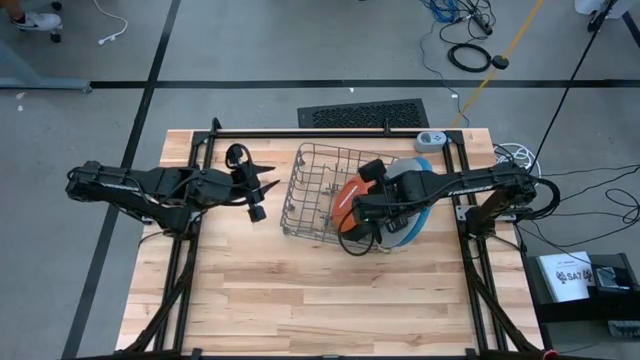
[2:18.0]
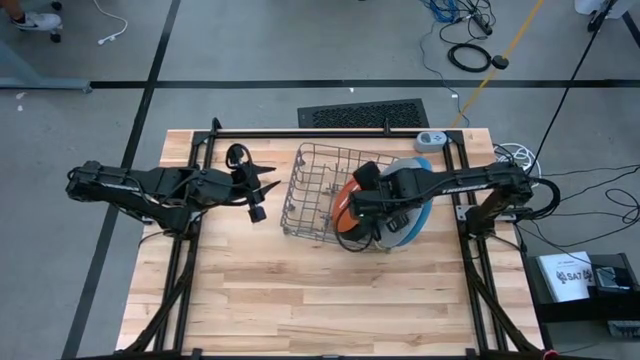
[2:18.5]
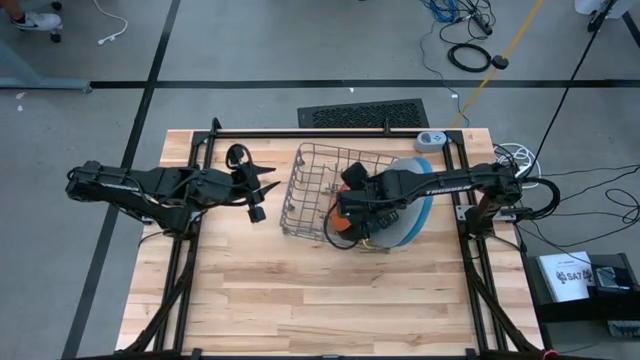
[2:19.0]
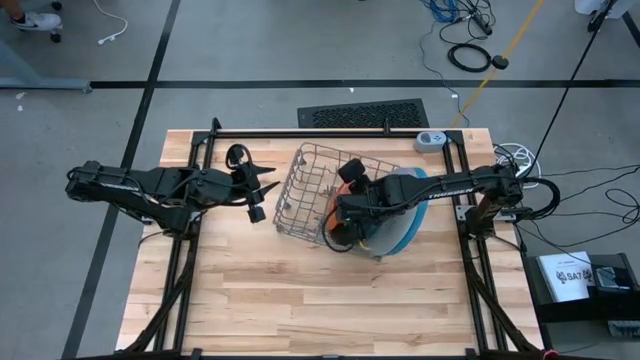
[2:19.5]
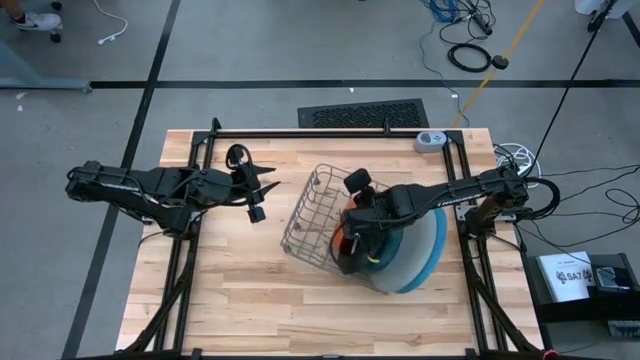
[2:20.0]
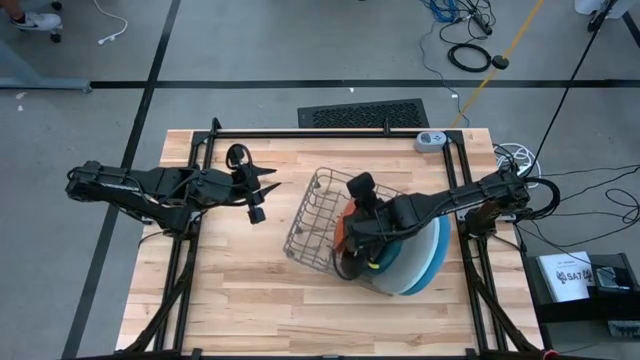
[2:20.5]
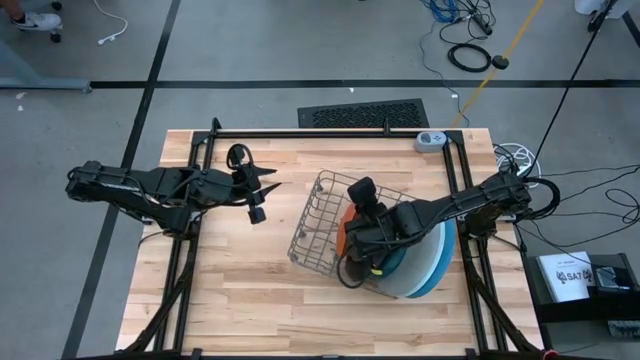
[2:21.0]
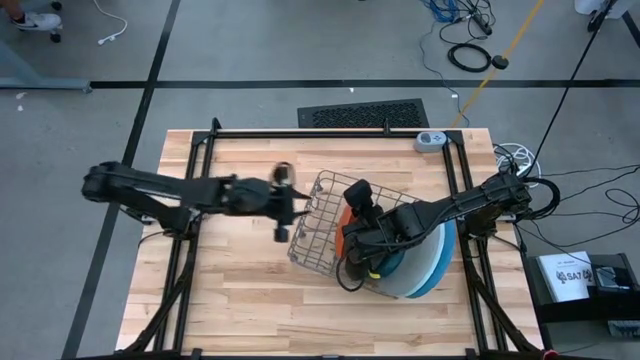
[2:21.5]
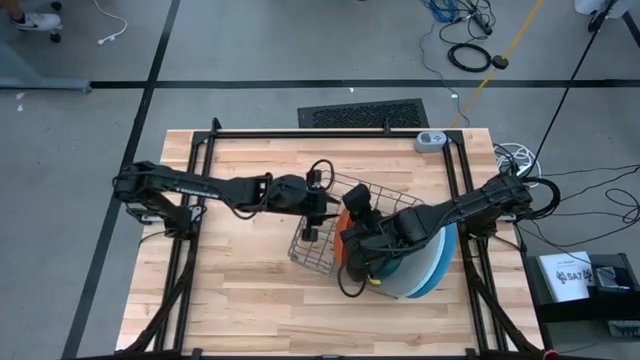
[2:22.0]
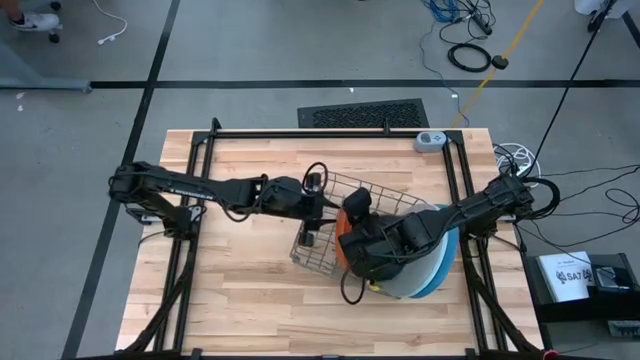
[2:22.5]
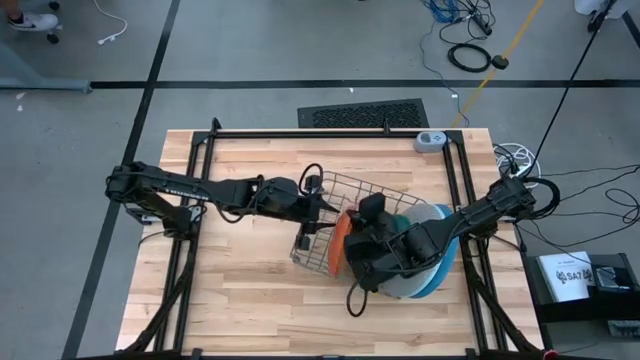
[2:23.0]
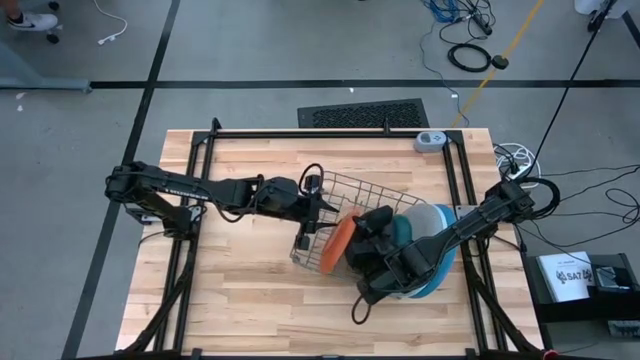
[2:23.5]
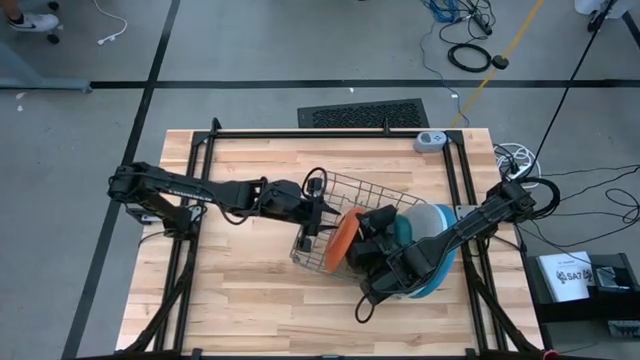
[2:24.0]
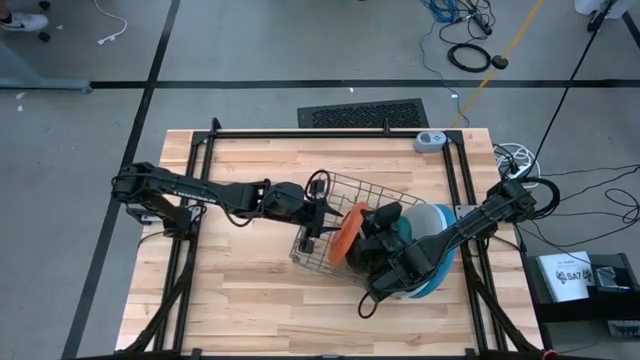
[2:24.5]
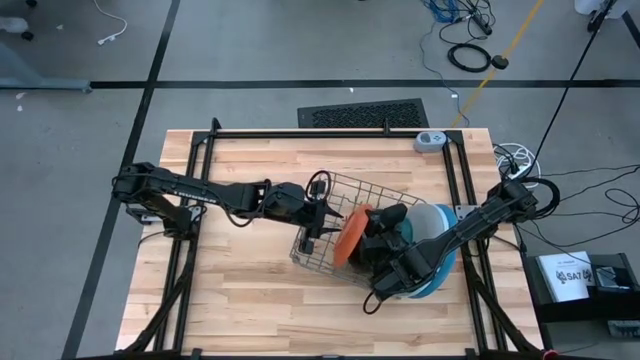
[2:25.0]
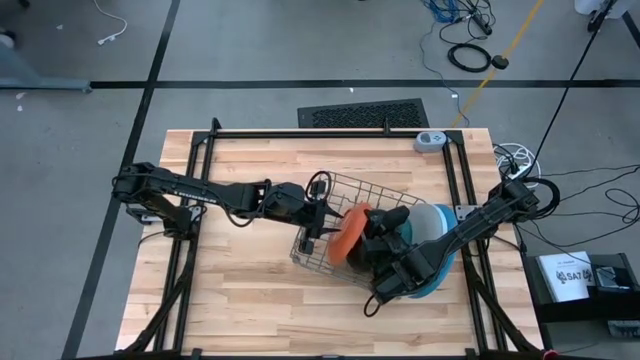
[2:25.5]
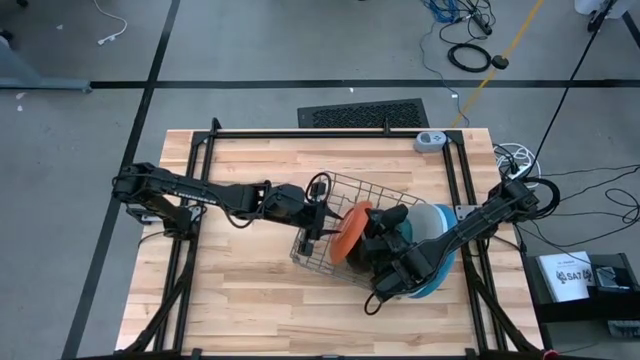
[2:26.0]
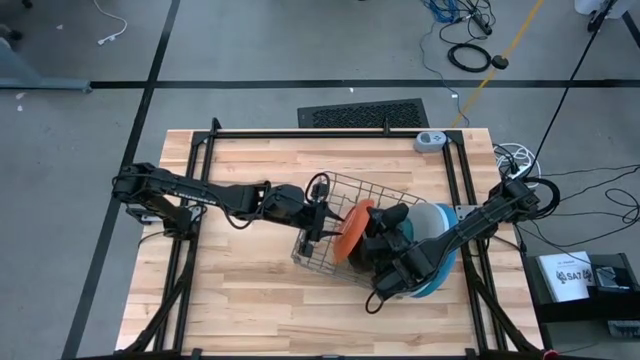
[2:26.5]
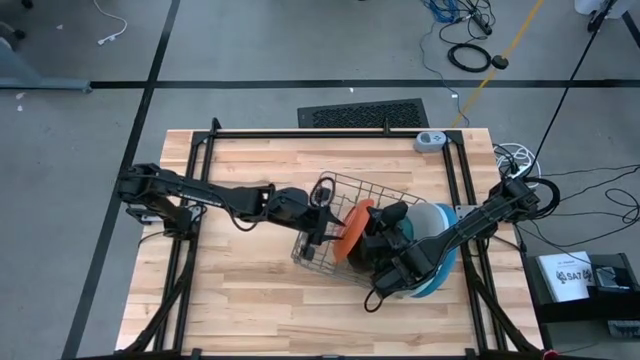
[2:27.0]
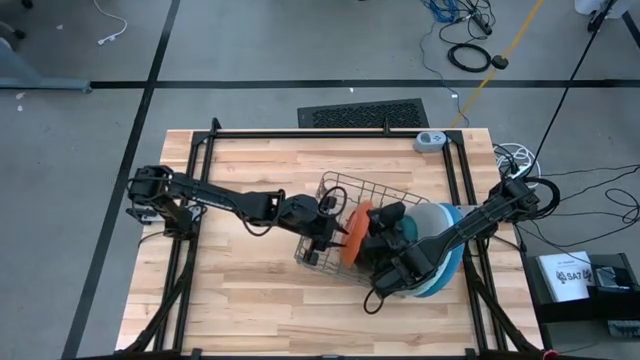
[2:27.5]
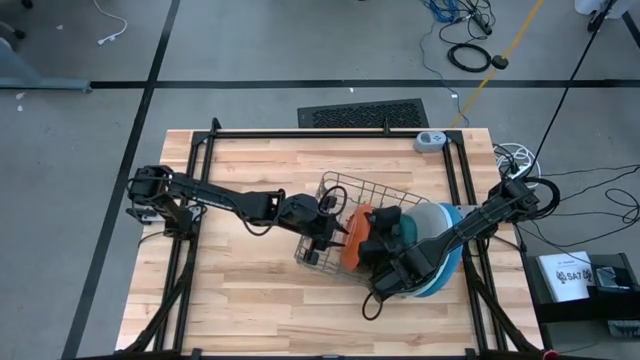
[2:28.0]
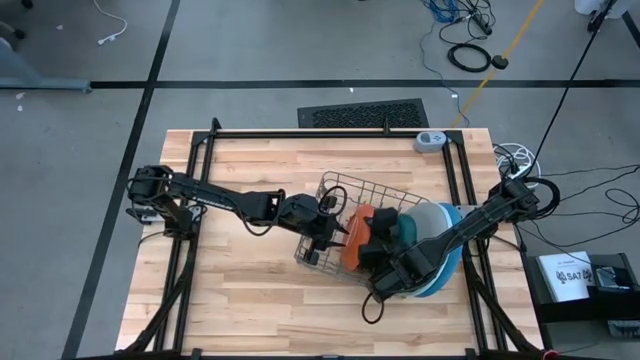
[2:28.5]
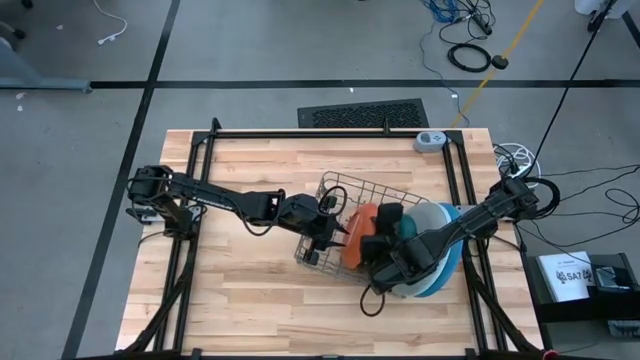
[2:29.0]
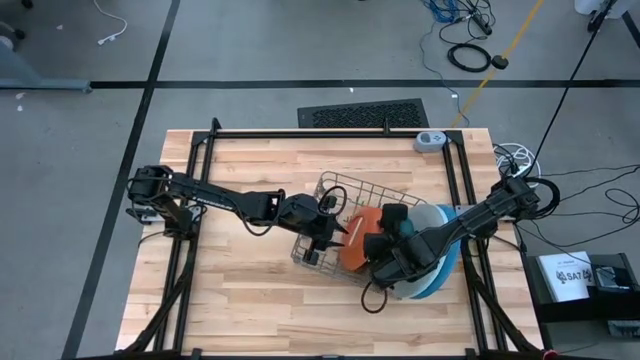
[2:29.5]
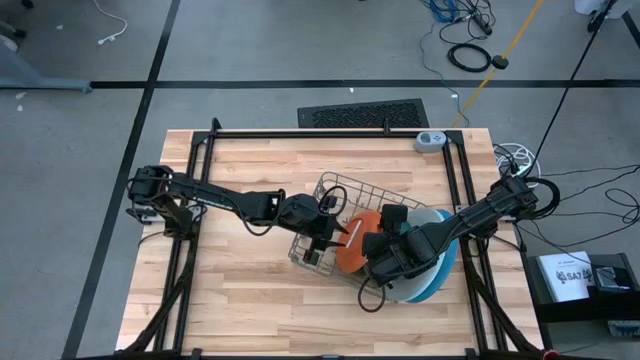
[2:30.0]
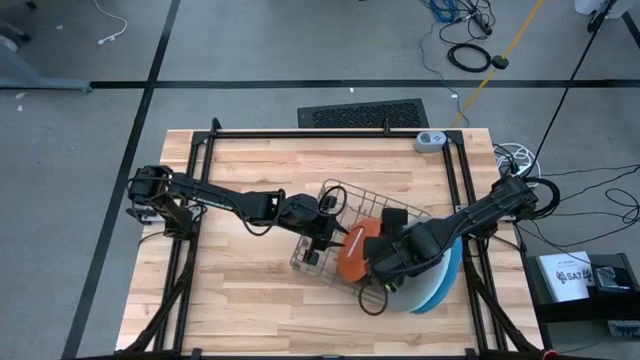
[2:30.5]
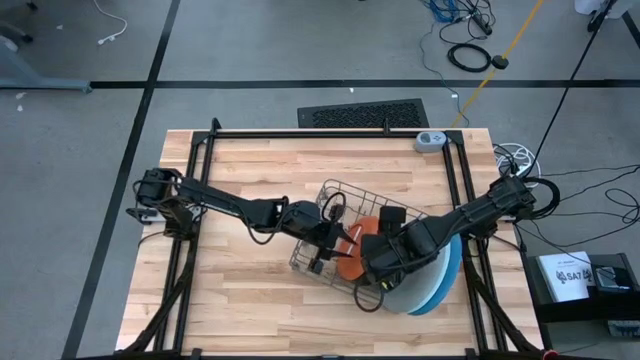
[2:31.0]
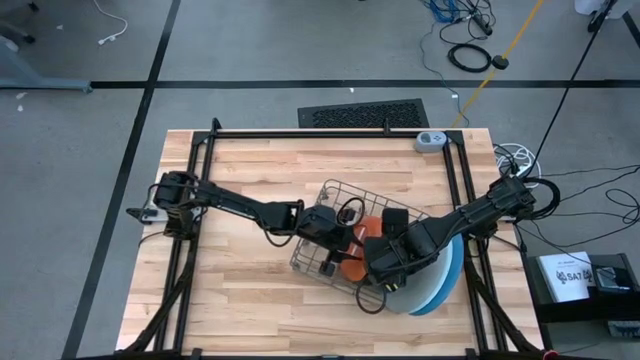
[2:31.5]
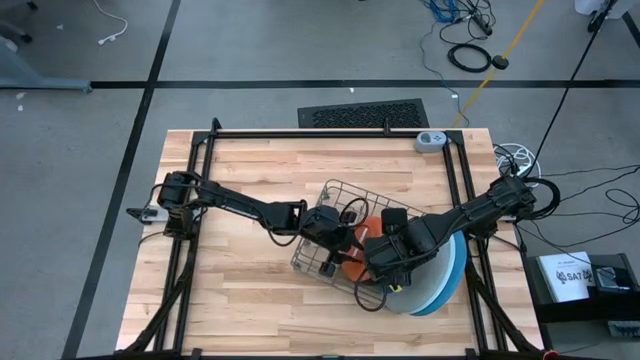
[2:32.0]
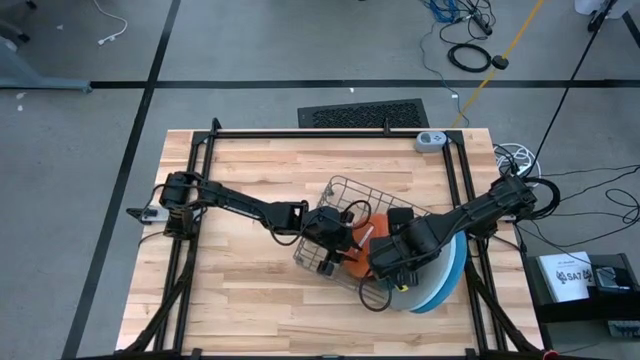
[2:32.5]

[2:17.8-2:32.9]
Task: Sort dishes
Put the orange plate into the dish rack

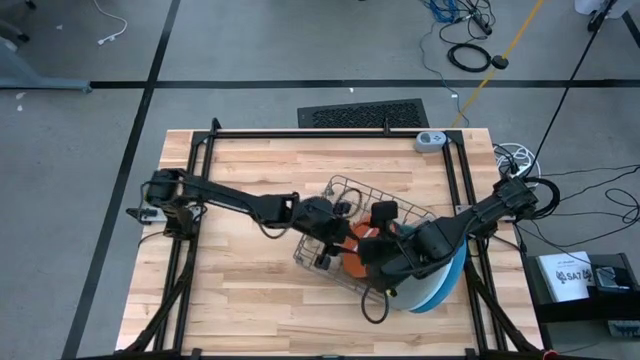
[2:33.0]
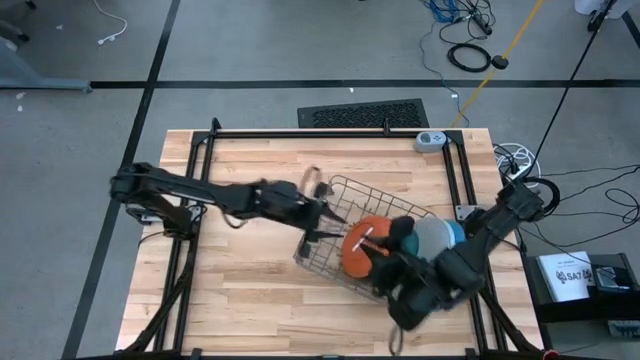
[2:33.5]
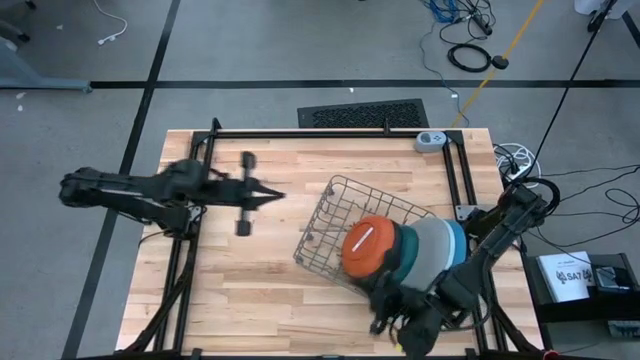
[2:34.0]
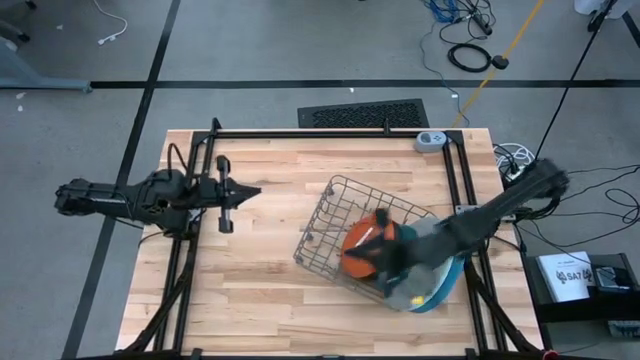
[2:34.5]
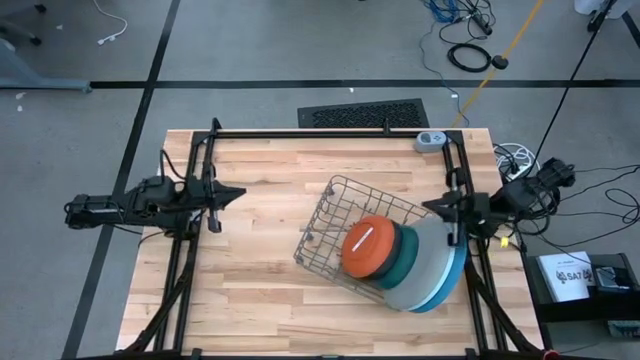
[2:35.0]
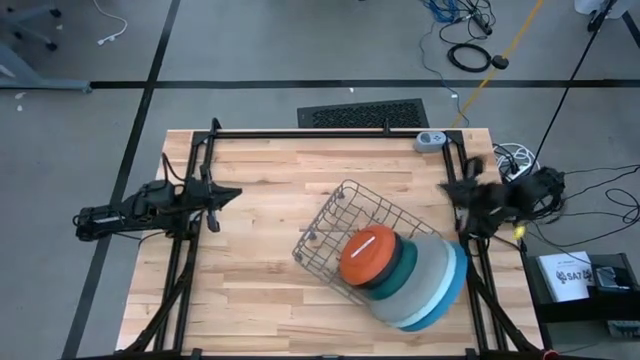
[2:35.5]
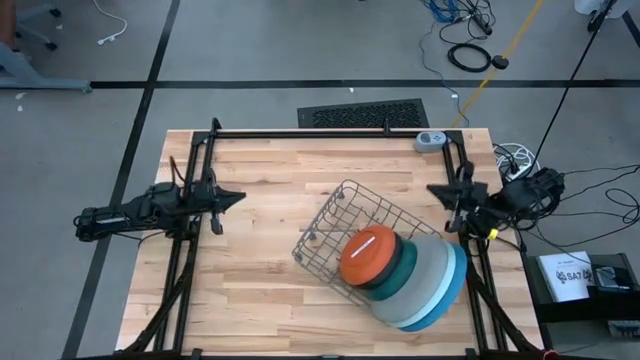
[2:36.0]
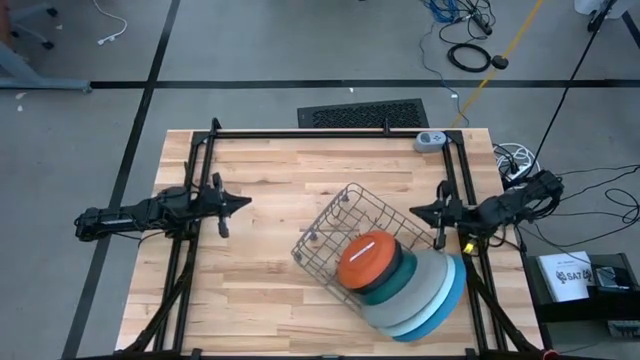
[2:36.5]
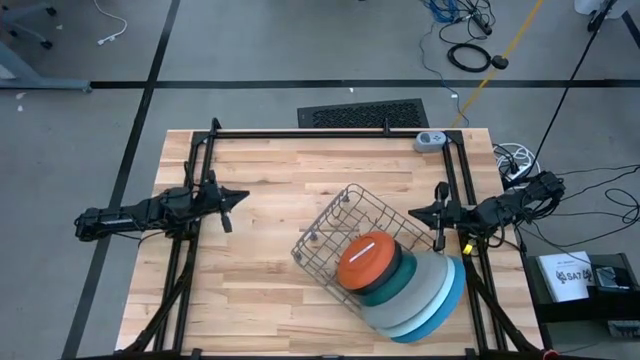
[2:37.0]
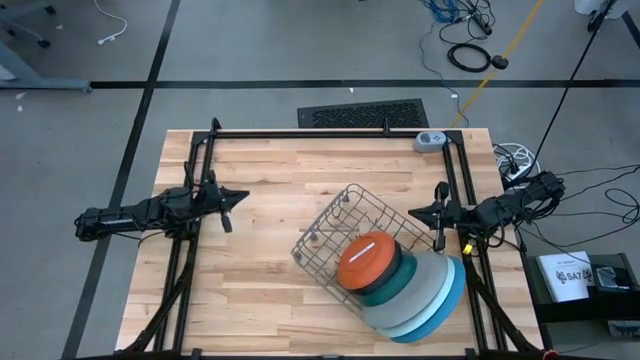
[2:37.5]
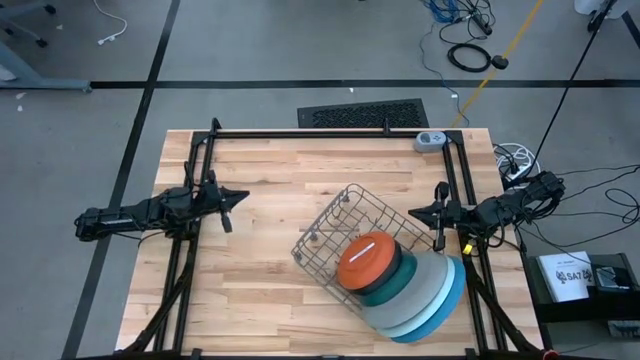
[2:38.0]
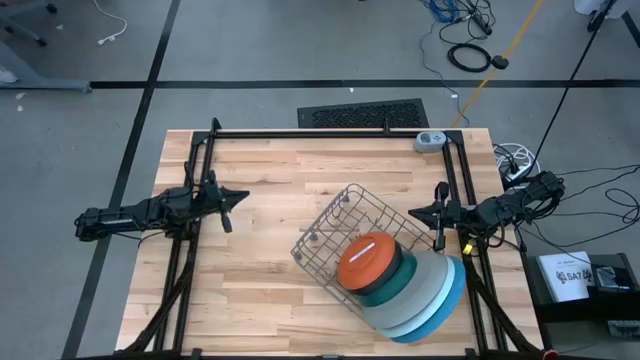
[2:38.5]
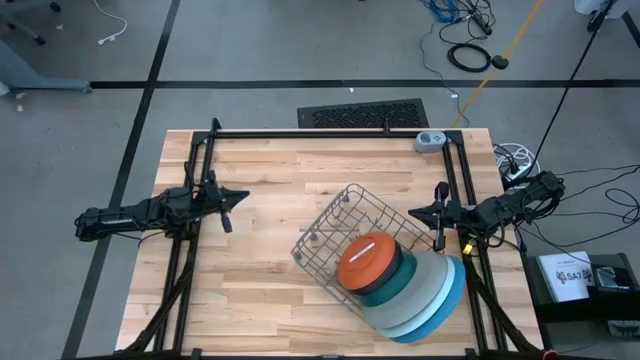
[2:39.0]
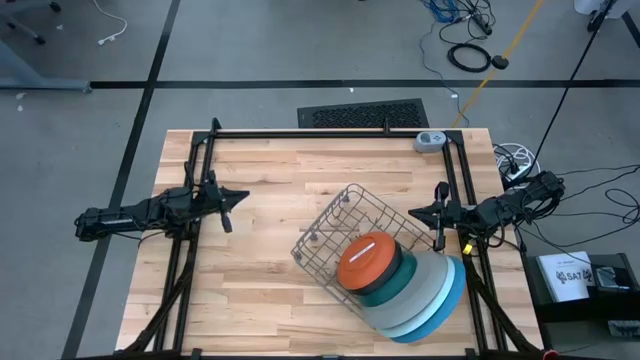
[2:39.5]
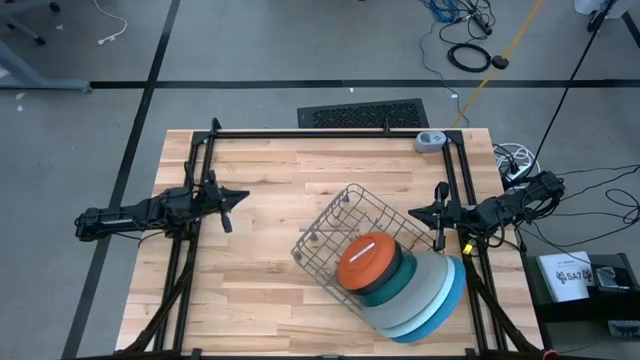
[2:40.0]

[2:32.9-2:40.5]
Return to Home Position
